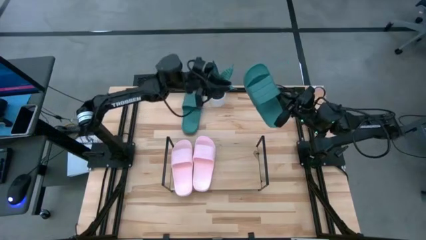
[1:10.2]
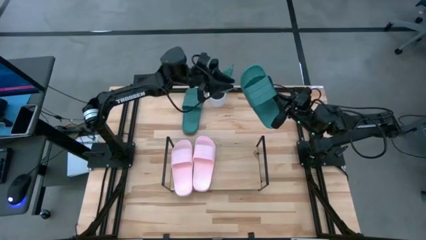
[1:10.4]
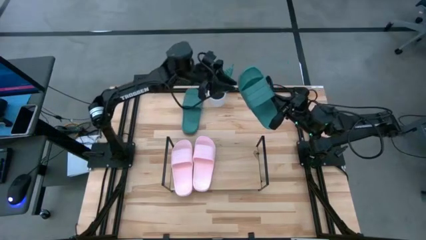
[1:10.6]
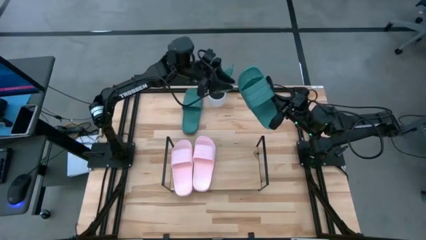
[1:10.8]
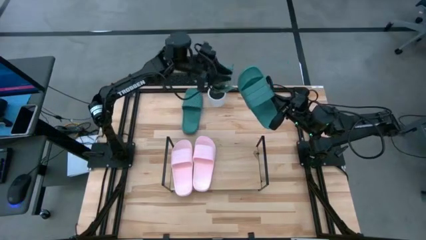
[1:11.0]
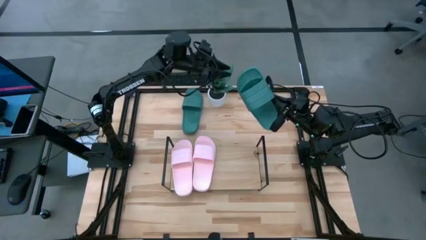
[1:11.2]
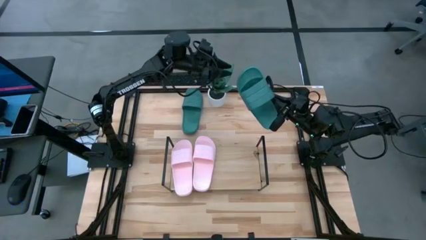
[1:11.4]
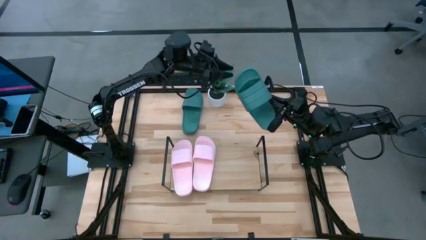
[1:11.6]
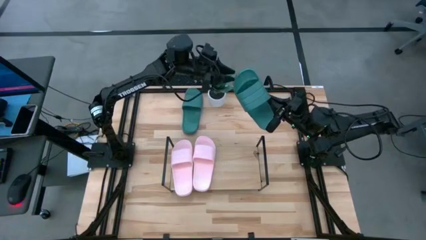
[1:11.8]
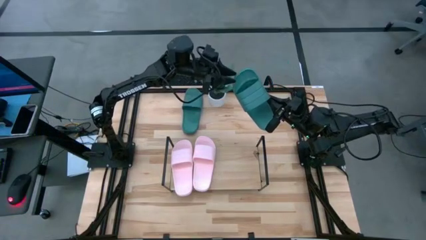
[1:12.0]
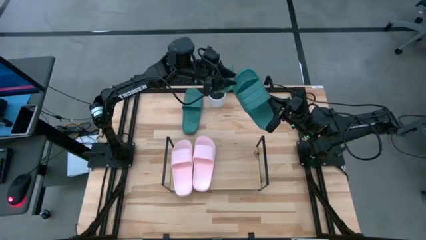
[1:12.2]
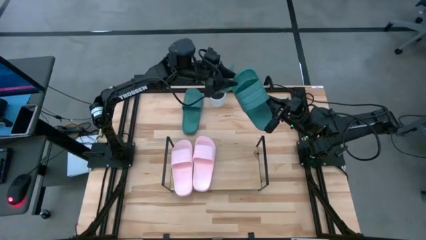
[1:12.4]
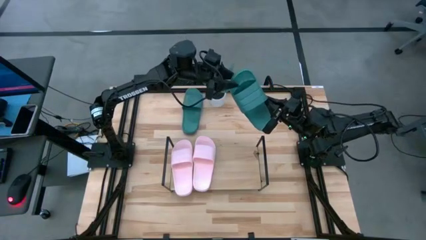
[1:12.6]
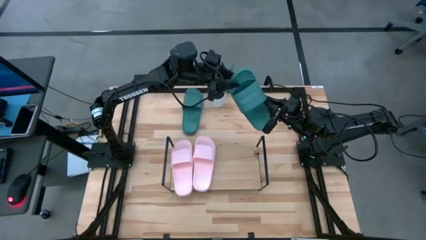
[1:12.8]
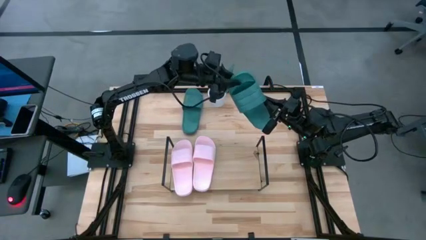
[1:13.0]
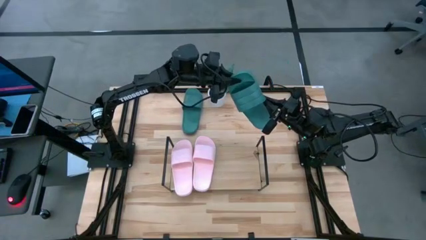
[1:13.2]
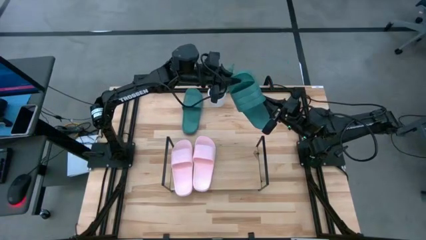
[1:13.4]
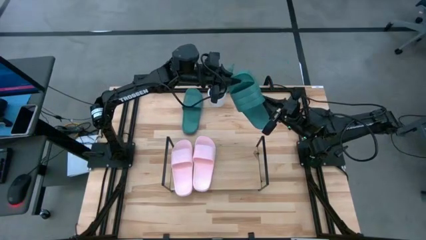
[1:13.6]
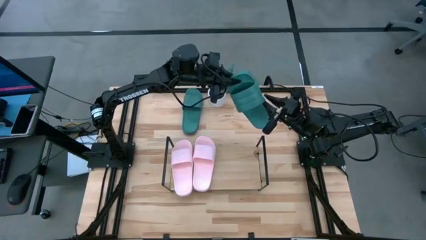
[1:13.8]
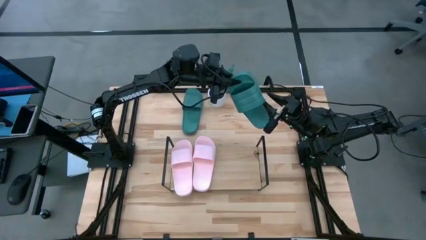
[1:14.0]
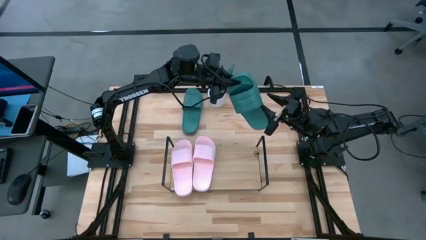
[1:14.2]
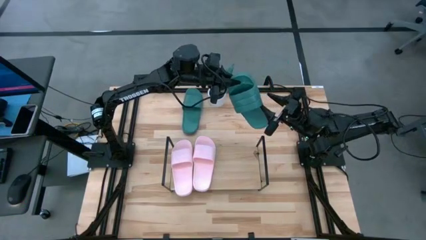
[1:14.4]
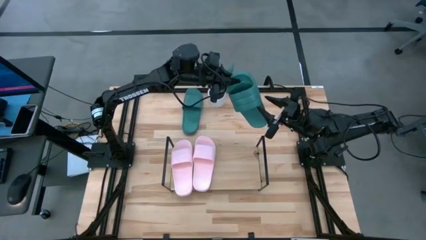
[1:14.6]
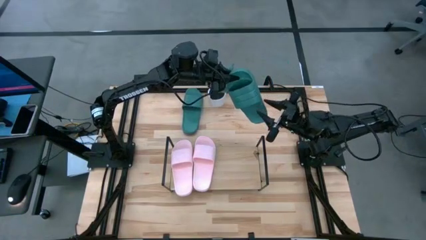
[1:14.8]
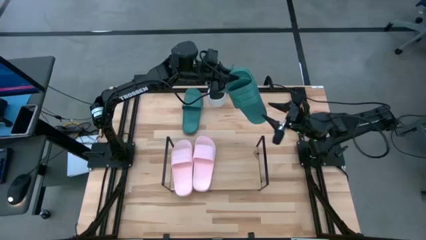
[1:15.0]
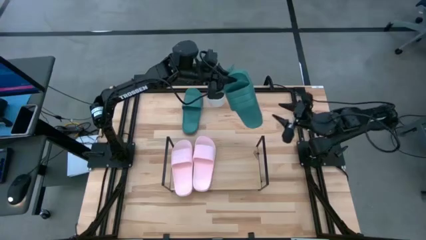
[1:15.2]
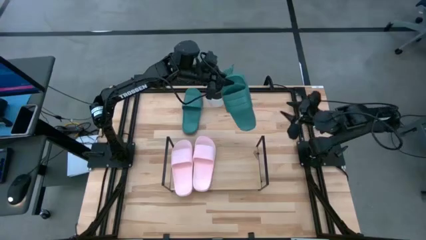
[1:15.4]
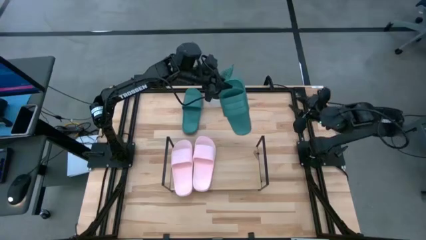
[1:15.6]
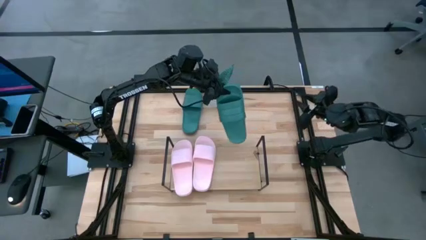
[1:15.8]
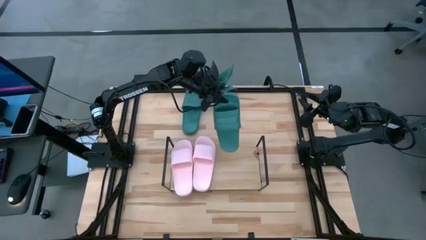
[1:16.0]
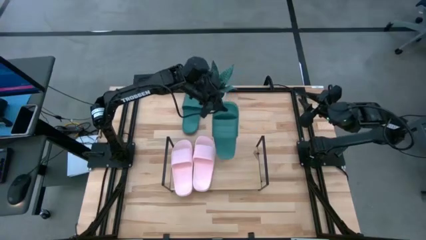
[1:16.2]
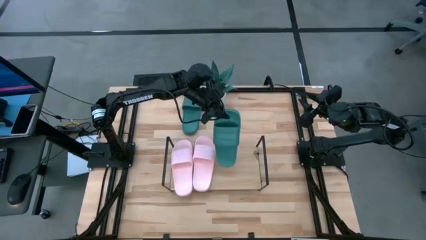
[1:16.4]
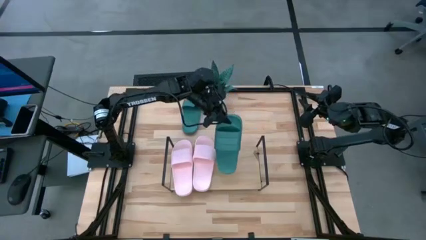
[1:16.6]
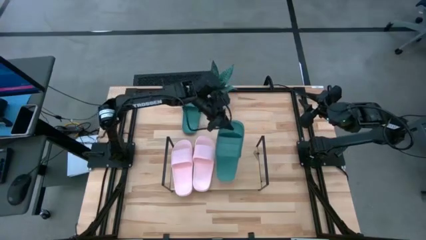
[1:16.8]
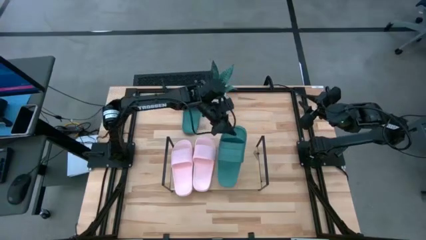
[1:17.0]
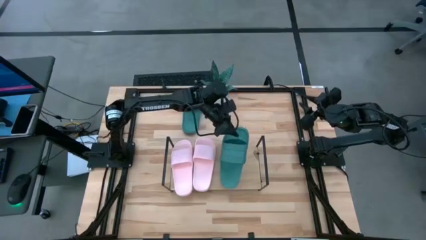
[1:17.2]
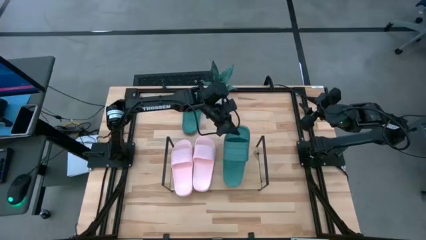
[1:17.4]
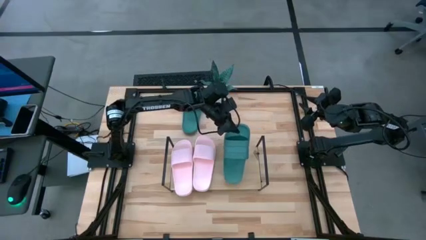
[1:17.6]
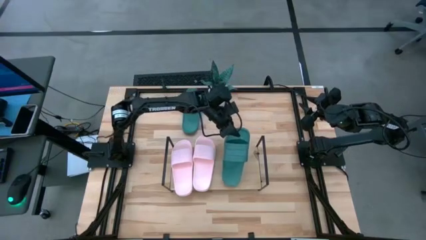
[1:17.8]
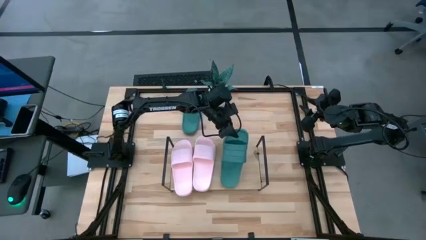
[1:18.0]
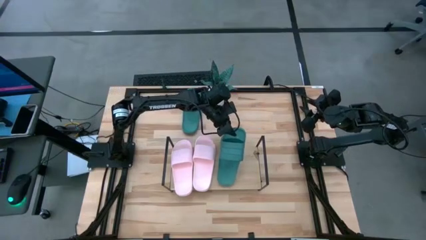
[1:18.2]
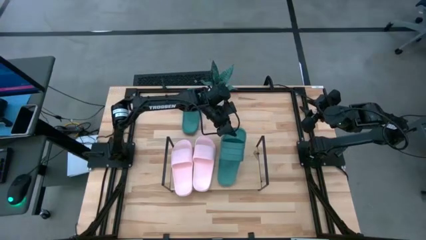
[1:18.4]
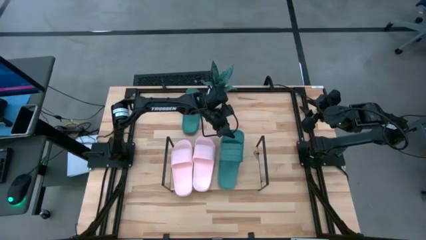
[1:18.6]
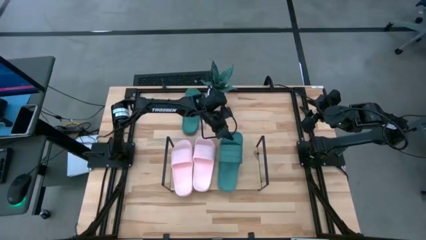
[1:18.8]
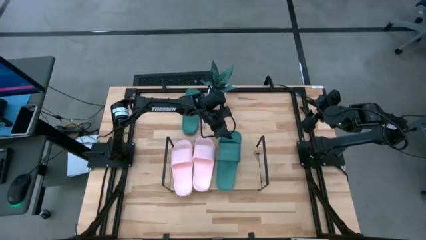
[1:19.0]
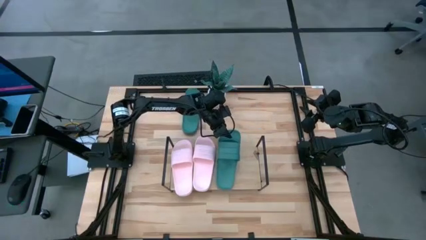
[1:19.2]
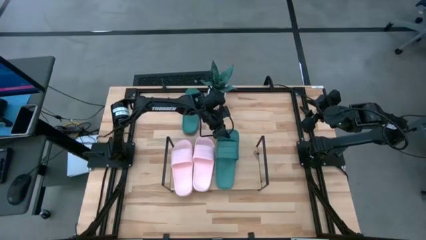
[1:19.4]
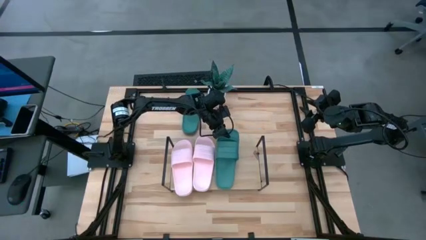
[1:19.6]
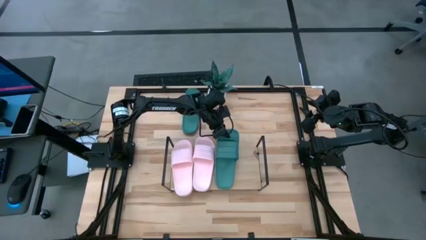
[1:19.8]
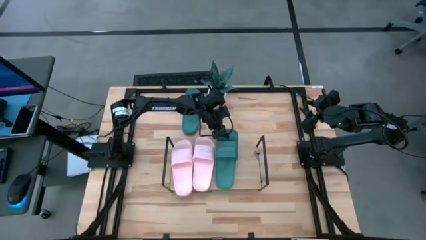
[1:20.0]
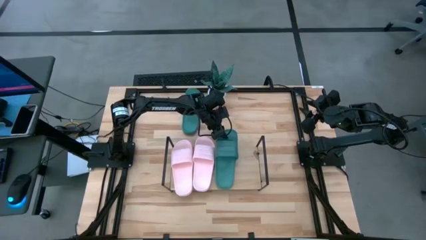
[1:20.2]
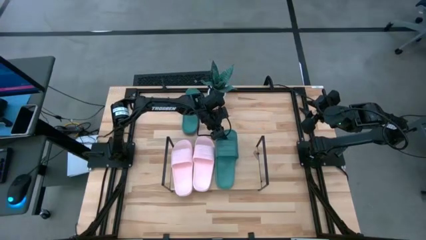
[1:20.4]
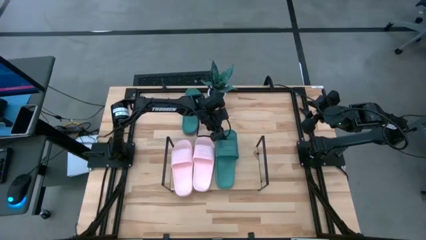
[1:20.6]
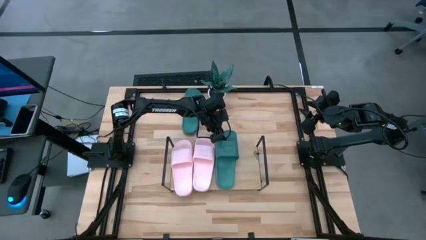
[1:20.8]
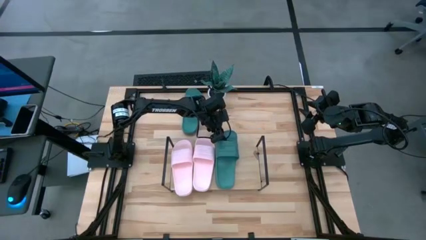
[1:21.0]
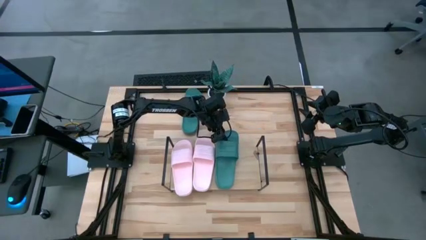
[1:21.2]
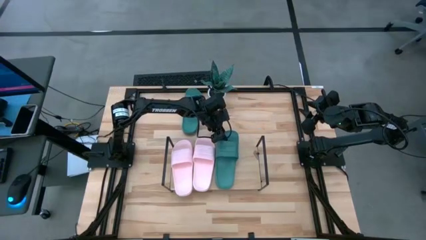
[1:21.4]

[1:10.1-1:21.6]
Task: Pick and place slides into the shelf
Put the right green slide on the shelf
